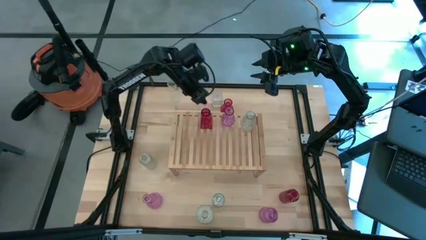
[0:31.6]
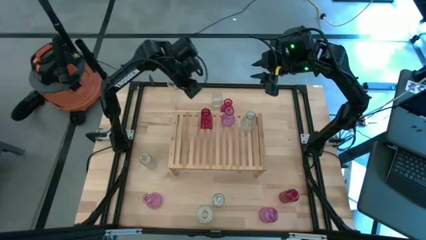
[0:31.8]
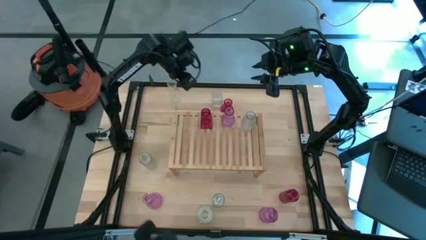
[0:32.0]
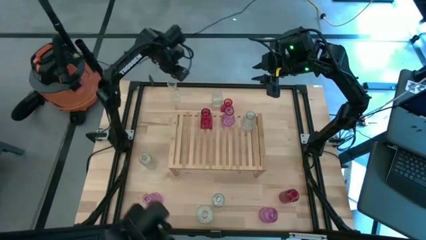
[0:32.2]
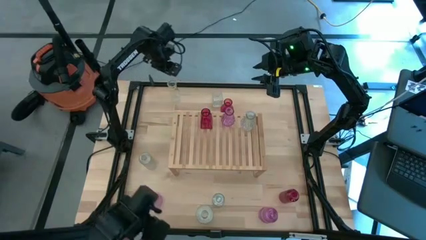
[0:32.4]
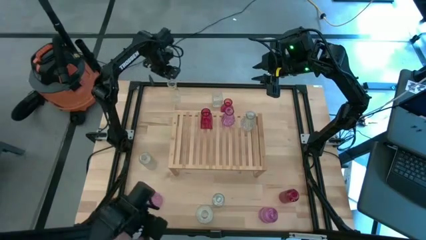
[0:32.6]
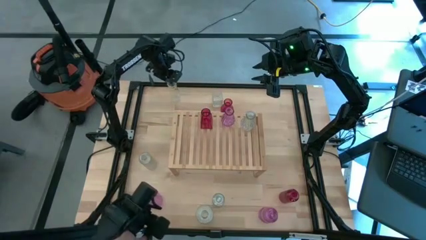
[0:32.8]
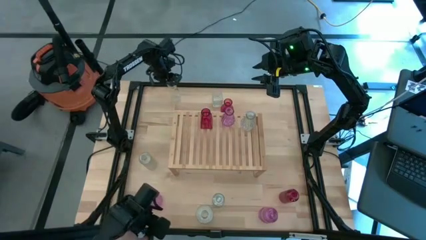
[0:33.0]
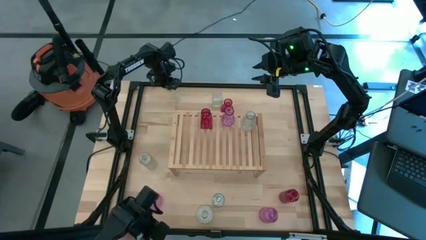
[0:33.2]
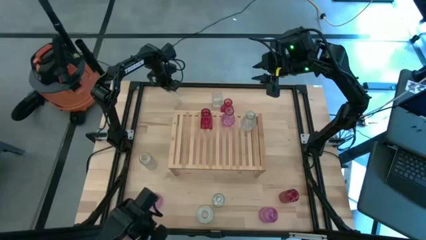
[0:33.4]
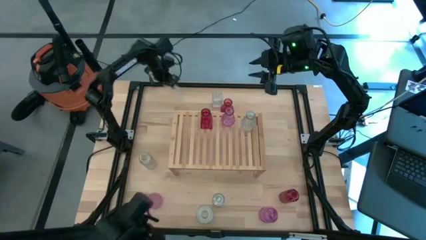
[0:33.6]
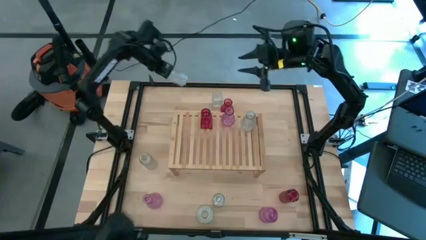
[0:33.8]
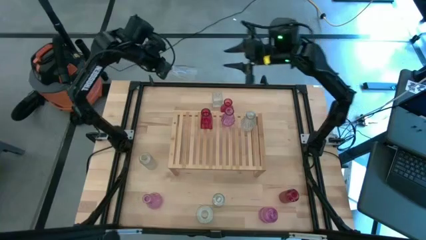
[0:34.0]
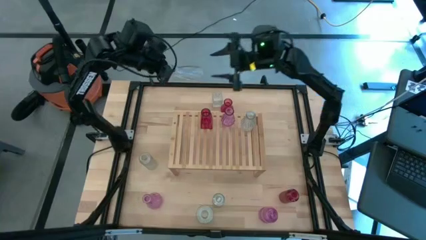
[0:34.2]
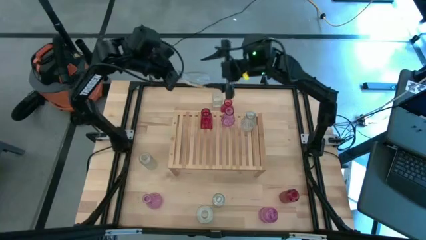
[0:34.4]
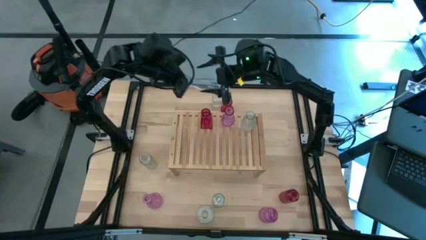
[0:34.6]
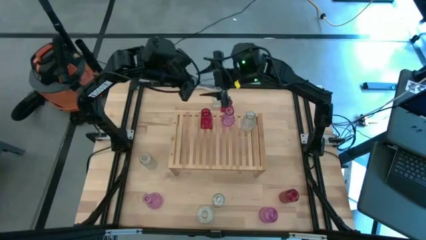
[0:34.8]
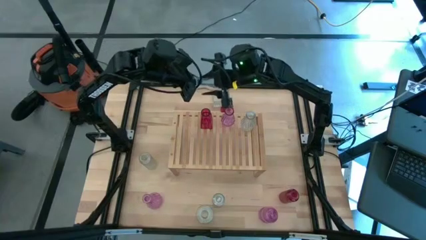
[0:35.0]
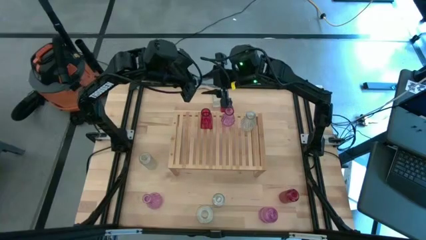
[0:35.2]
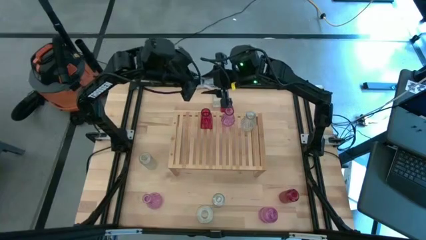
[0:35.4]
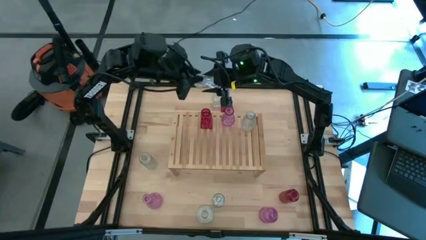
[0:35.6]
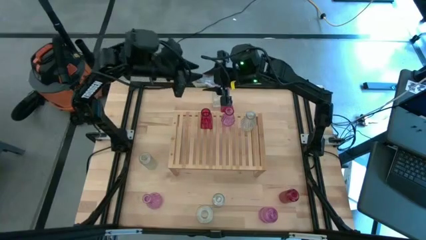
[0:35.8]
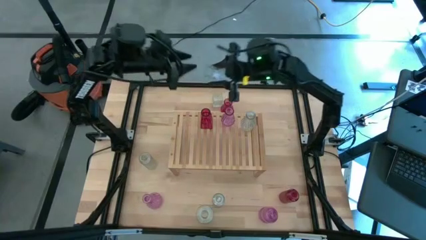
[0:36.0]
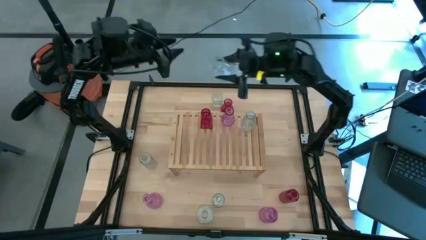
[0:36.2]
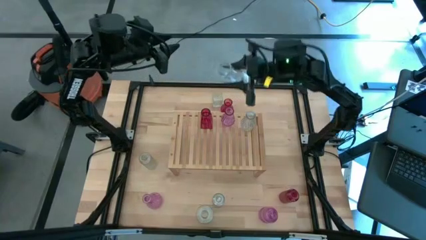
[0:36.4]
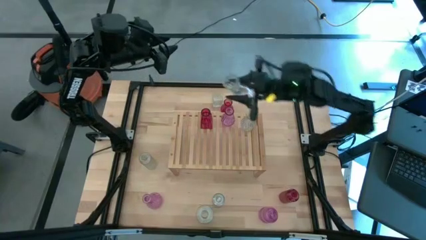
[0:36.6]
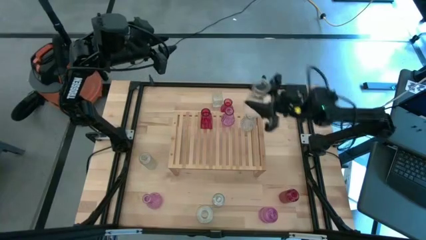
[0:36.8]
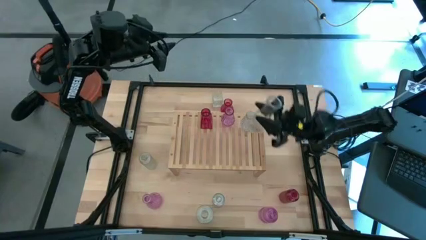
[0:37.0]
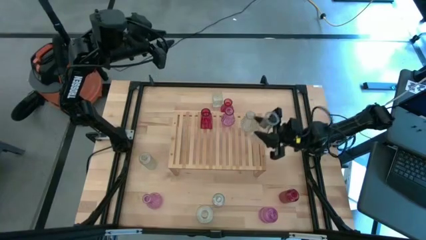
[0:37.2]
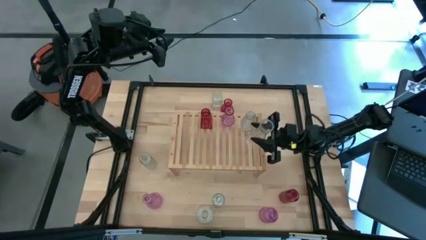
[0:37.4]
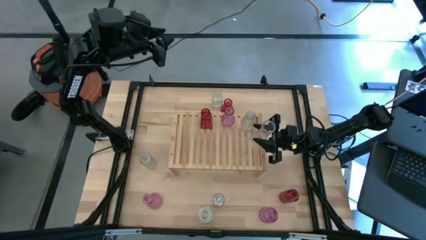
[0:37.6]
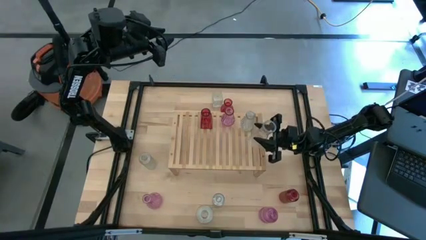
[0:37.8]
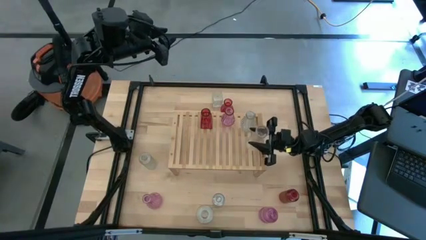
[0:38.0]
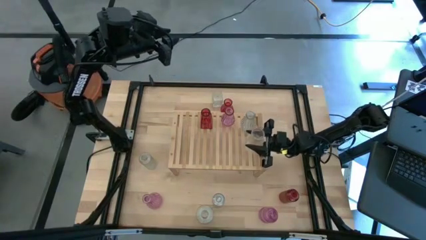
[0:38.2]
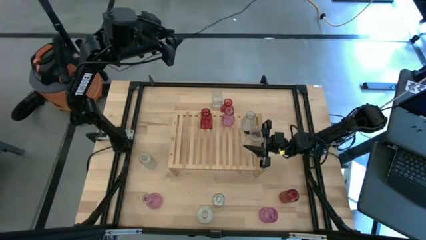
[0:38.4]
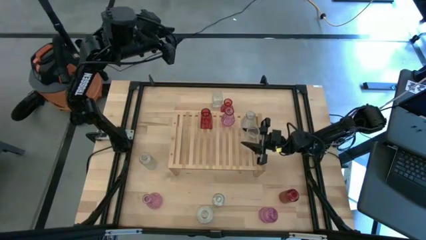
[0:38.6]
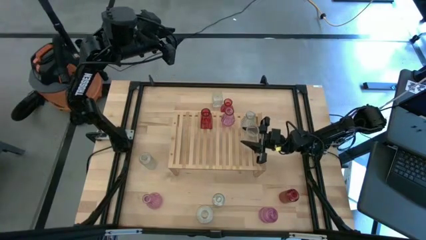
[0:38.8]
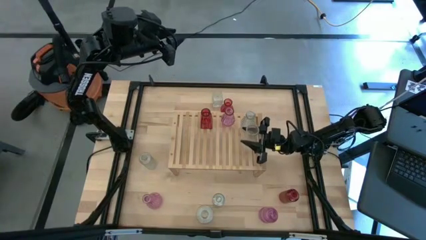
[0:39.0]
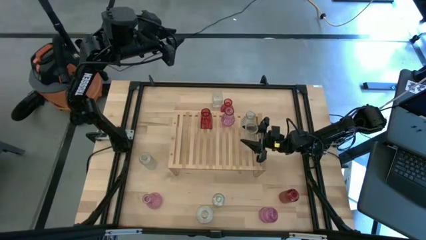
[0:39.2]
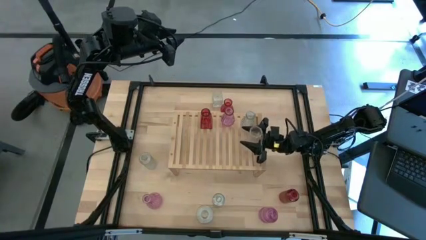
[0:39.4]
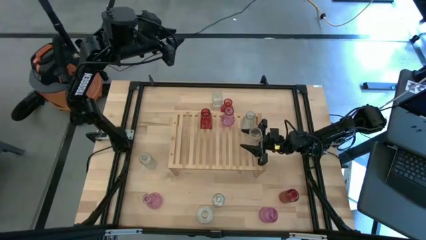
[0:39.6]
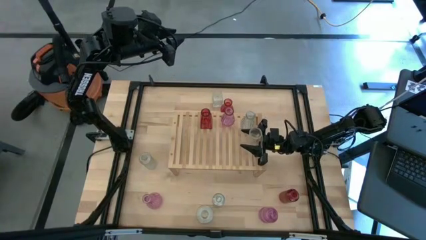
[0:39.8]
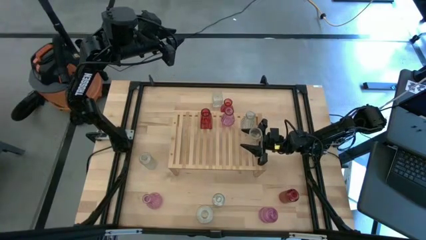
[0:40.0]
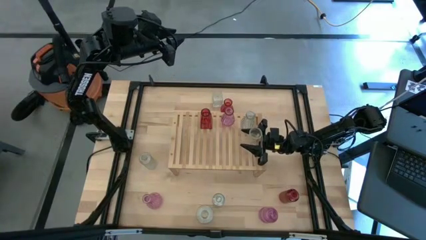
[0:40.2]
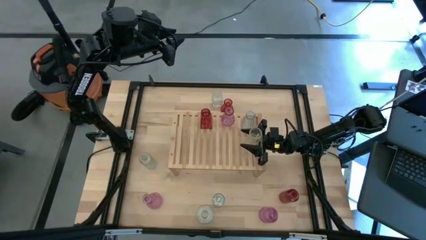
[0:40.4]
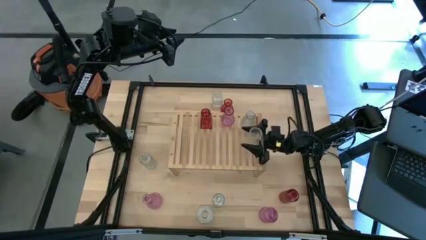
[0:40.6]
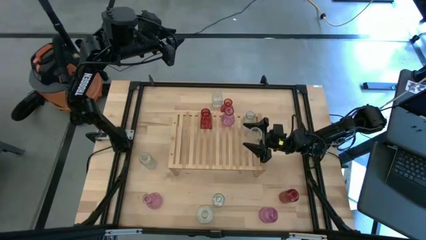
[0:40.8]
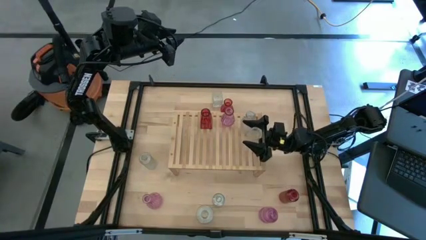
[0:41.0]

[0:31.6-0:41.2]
Task: sort vases onto shelf
Put the transparent vase on the shelf aligned with the other transparent vase

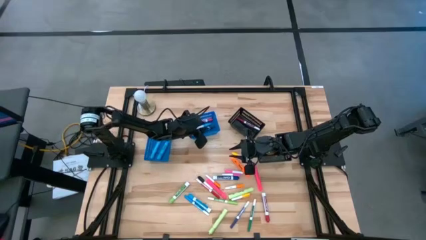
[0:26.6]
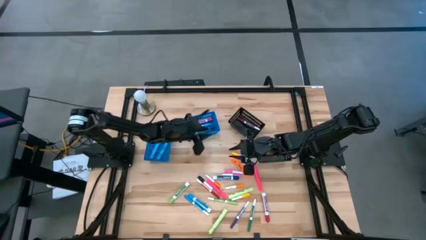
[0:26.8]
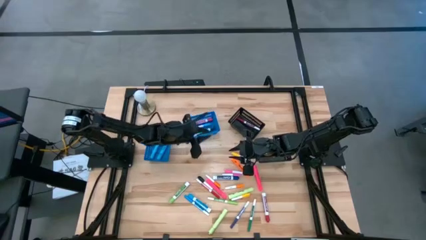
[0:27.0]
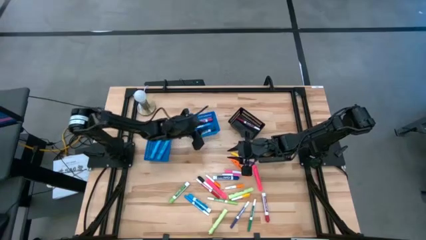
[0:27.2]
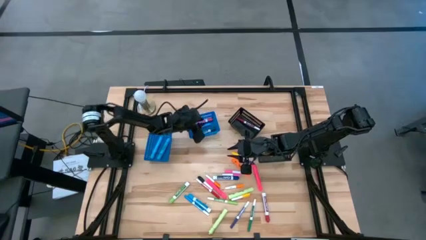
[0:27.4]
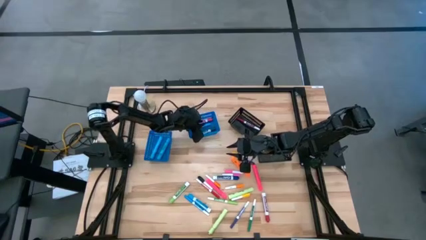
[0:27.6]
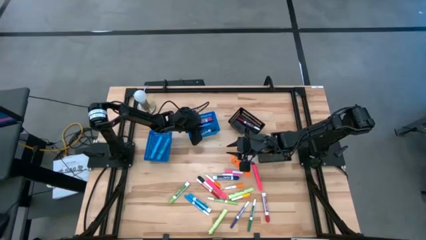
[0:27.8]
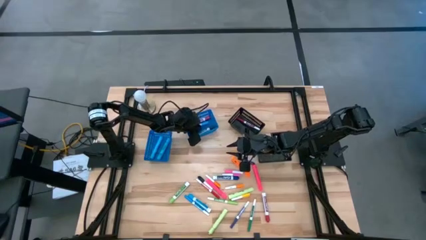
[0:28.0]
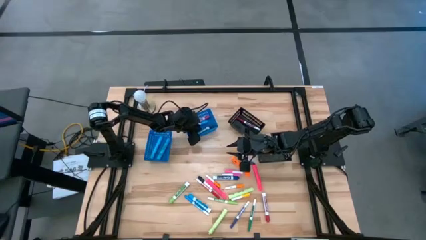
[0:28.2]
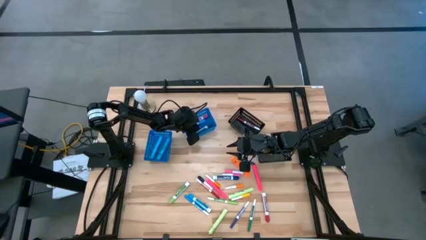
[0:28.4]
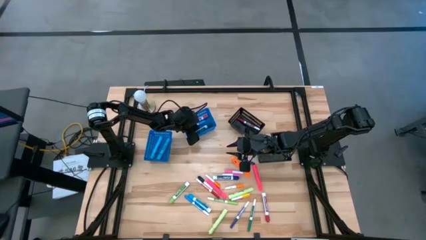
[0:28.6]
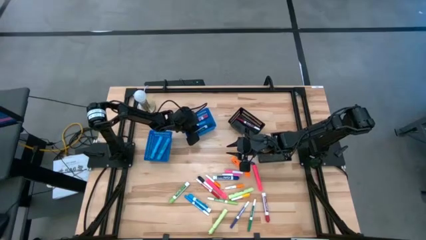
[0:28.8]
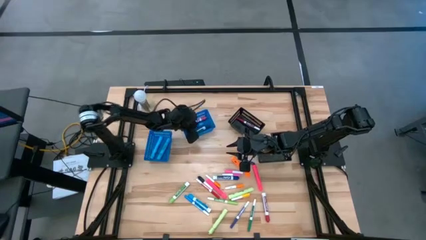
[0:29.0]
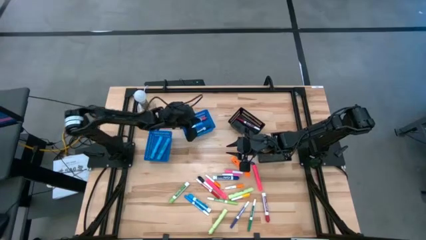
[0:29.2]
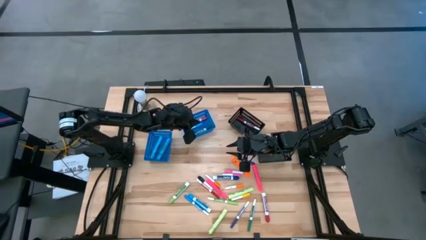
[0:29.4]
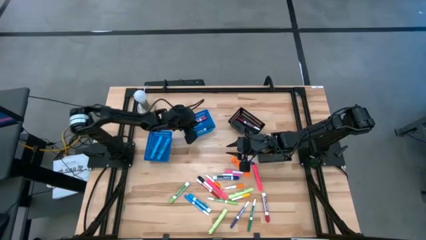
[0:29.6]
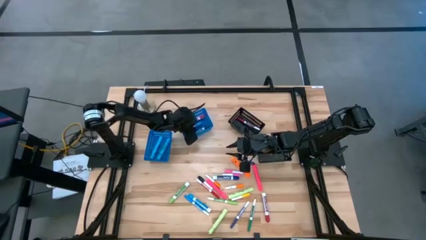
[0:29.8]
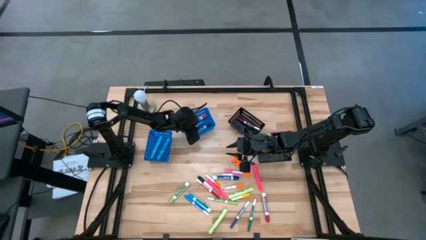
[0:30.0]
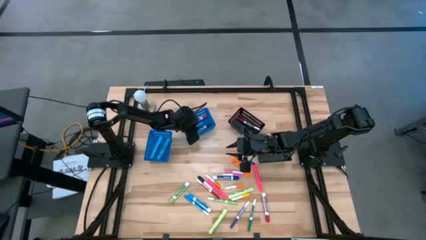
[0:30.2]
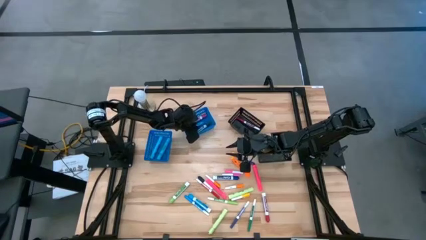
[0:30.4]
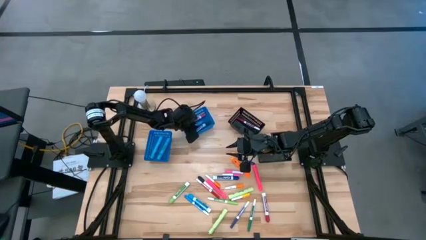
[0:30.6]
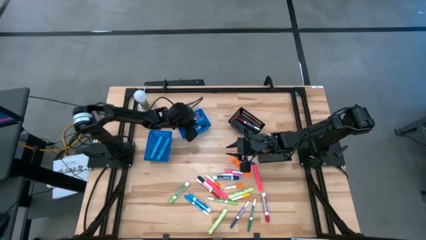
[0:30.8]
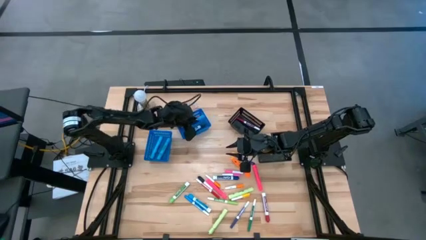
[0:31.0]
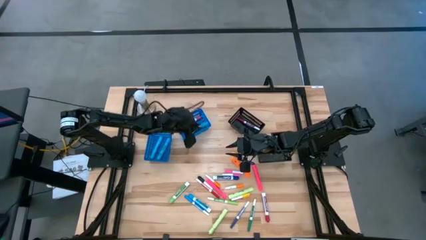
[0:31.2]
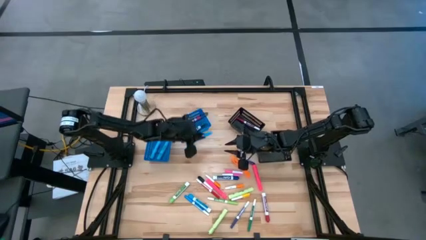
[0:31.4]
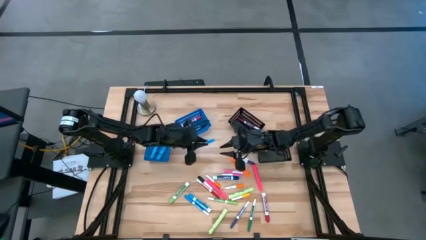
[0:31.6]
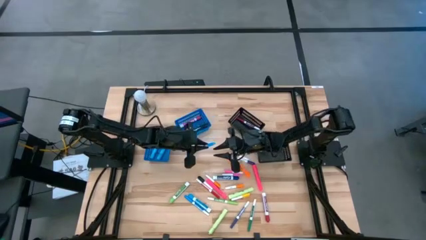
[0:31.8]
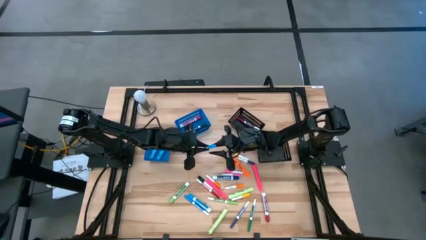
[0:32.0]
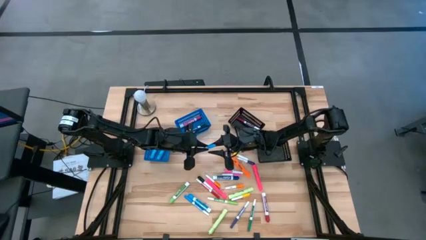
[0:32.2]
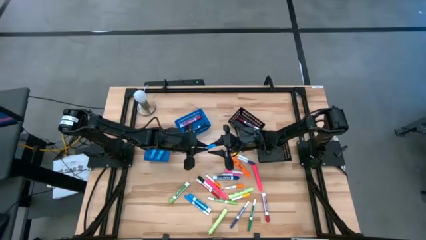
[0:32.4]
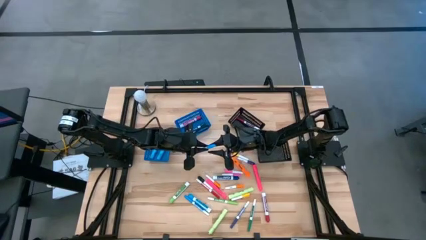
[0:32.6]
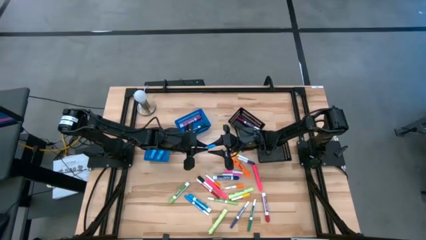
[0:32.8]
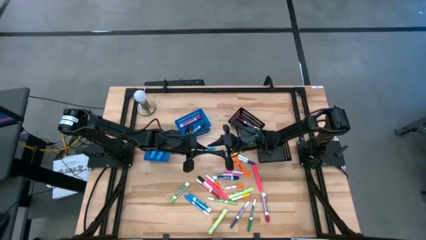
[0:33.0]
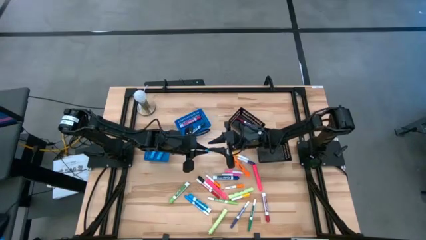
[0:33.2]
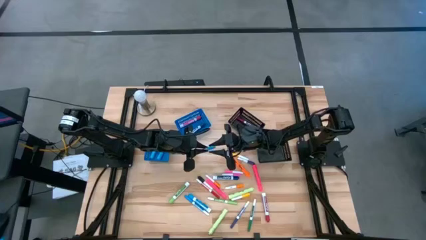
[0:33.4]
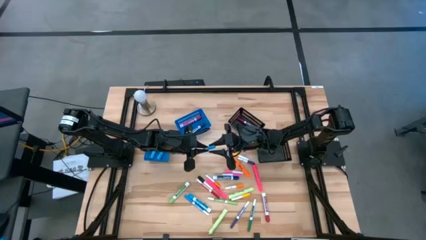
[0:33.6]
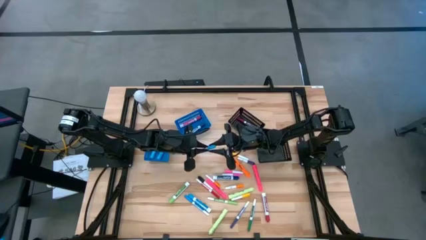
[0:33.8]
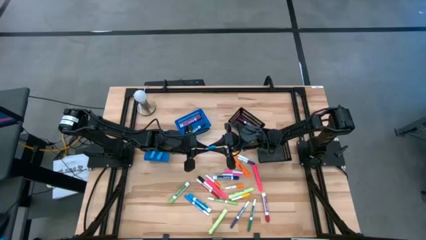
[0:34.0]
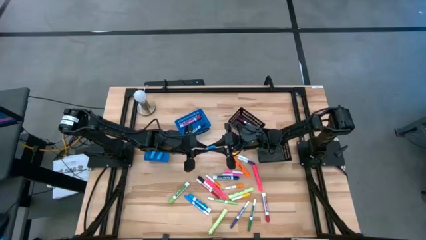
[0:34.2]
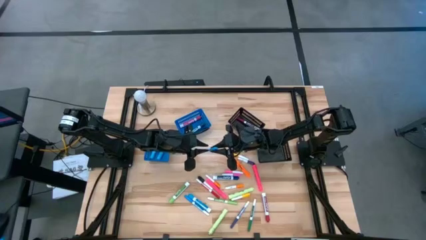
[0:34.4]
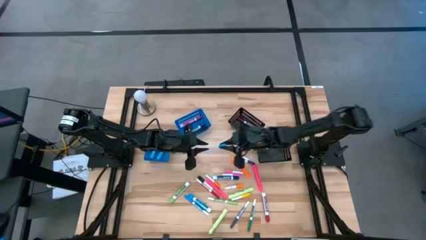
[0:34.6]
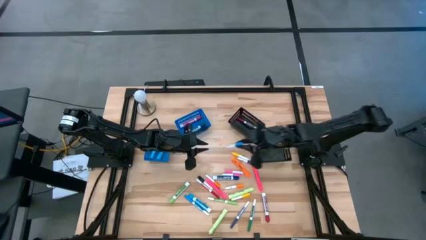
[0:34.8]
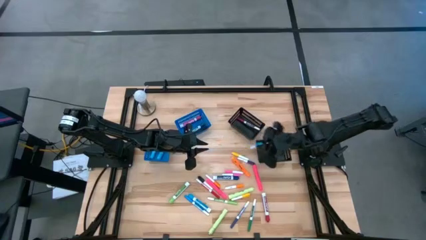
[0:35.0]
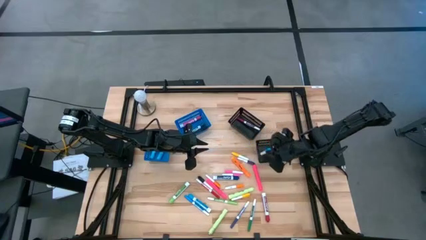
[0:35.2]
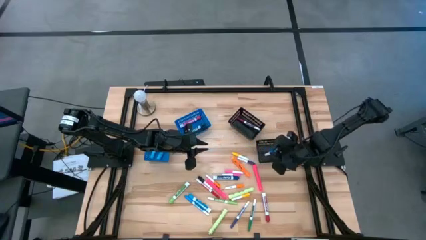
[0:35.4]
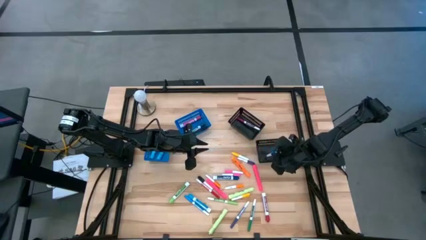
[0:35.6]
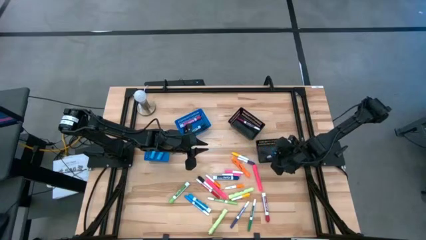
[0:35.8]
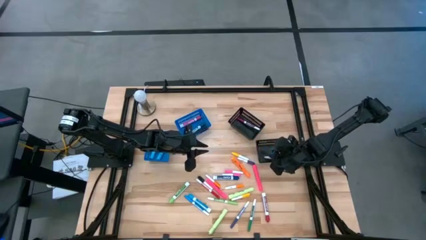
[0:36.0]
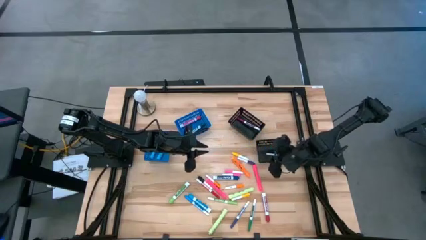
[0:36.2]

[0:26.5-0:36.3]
Task: Pick & Place Markers
Put the light blue highlighter pen into the bottom black bin
